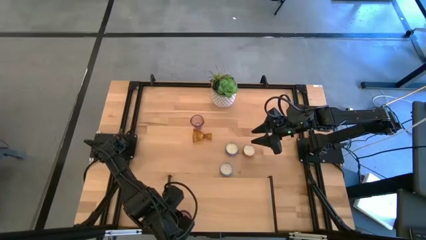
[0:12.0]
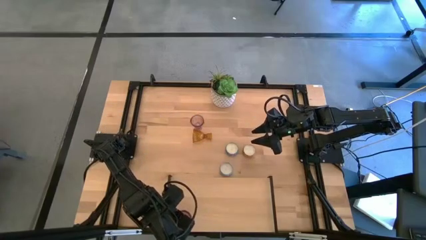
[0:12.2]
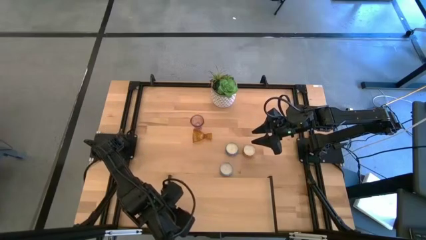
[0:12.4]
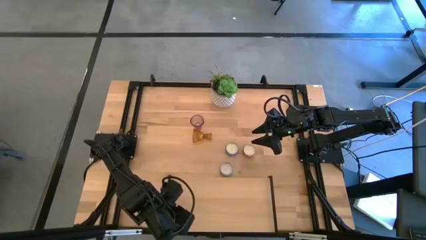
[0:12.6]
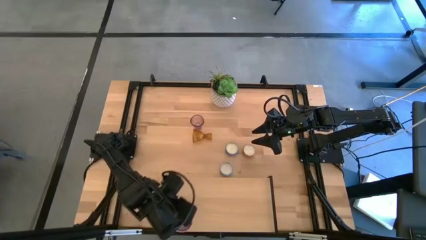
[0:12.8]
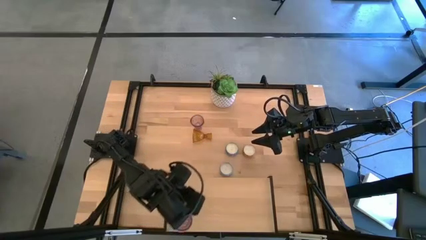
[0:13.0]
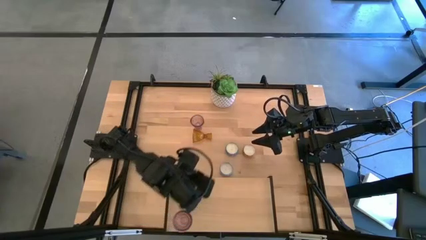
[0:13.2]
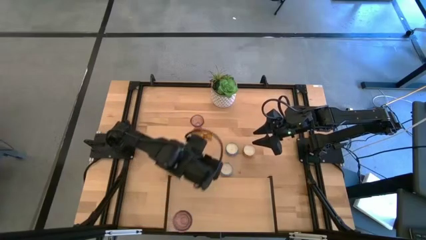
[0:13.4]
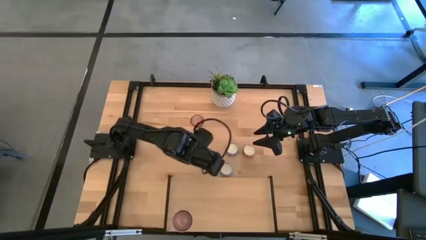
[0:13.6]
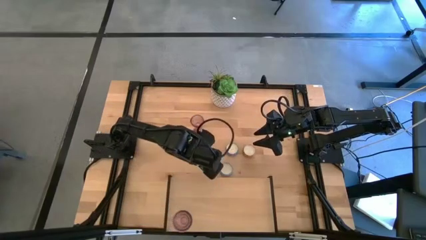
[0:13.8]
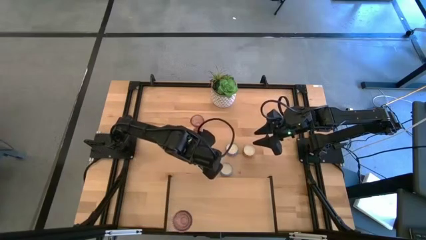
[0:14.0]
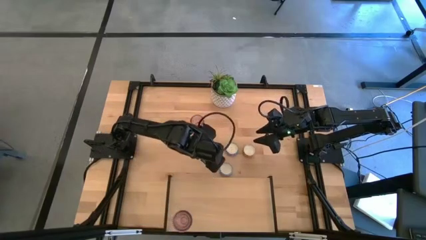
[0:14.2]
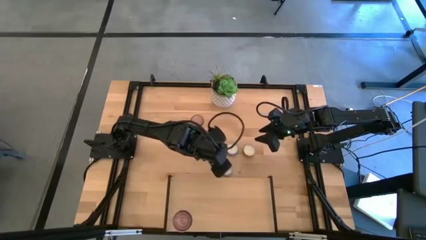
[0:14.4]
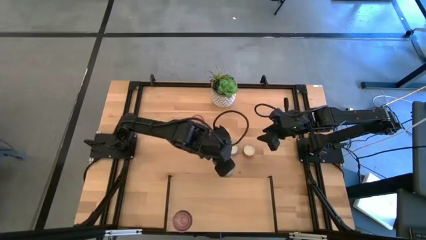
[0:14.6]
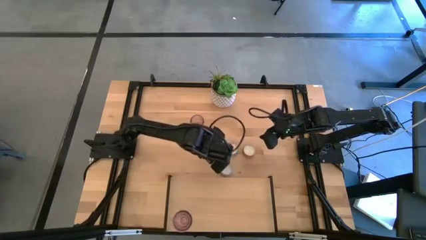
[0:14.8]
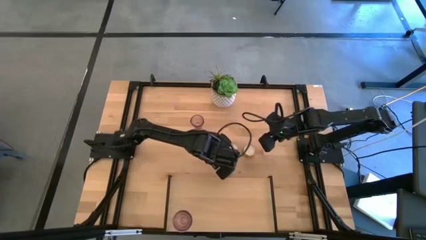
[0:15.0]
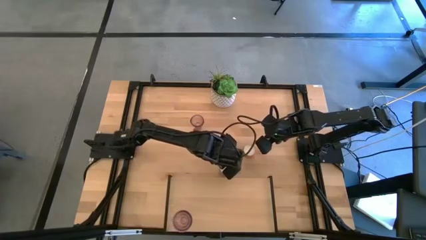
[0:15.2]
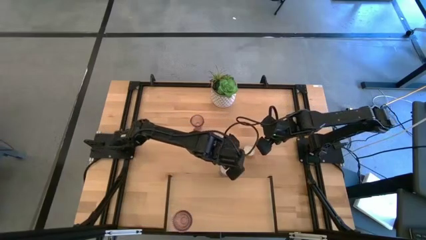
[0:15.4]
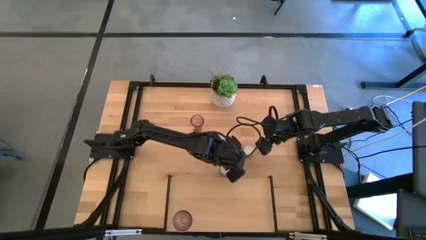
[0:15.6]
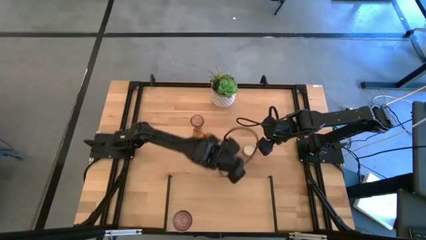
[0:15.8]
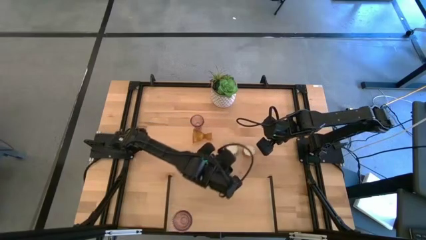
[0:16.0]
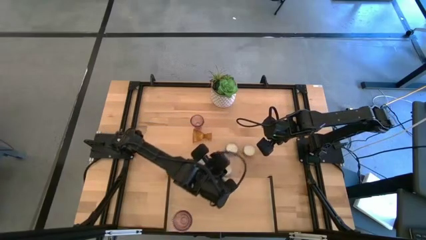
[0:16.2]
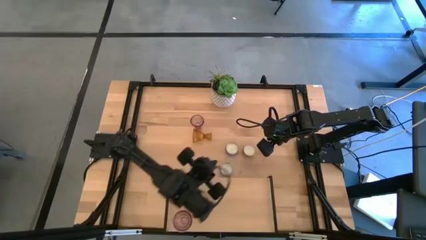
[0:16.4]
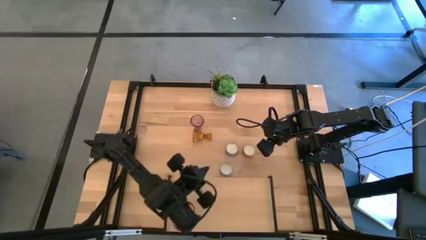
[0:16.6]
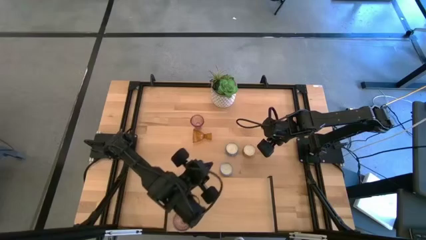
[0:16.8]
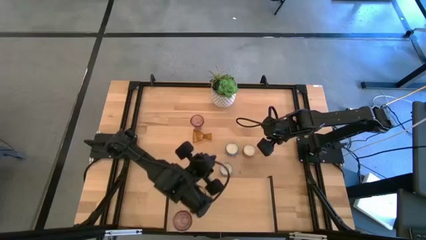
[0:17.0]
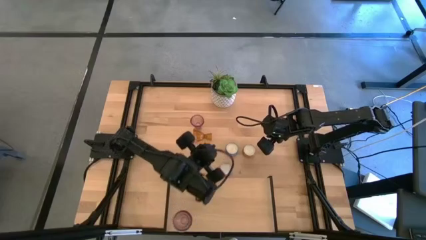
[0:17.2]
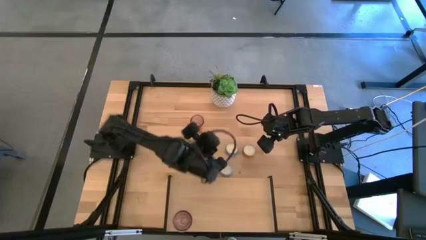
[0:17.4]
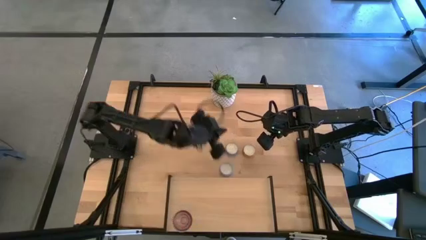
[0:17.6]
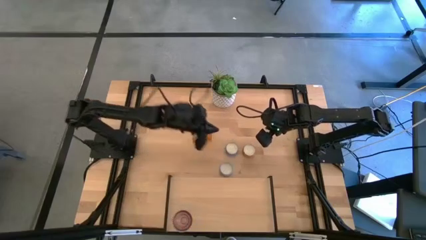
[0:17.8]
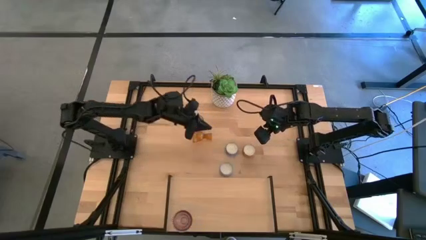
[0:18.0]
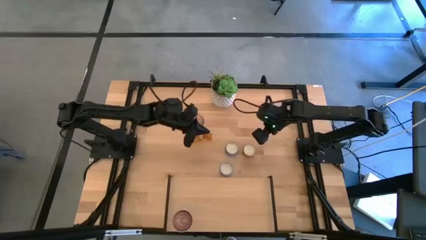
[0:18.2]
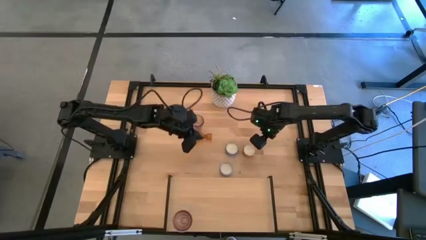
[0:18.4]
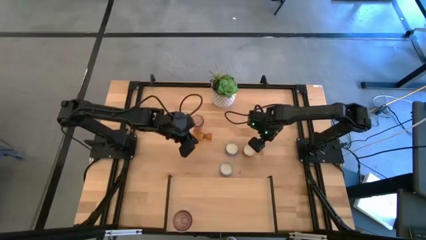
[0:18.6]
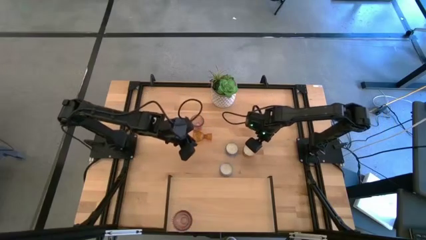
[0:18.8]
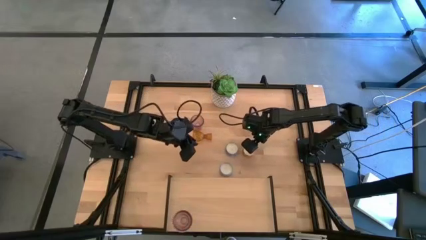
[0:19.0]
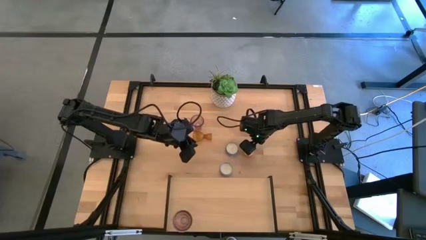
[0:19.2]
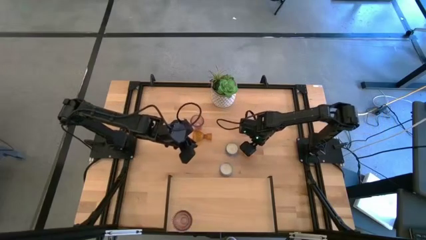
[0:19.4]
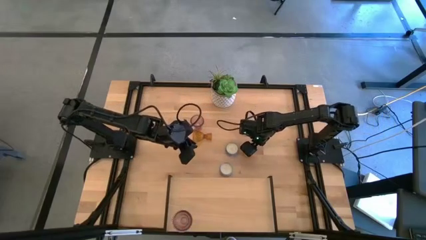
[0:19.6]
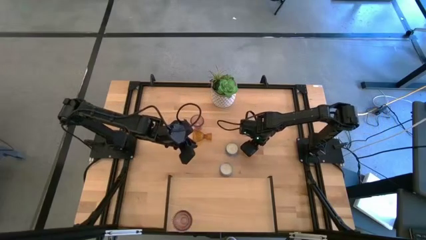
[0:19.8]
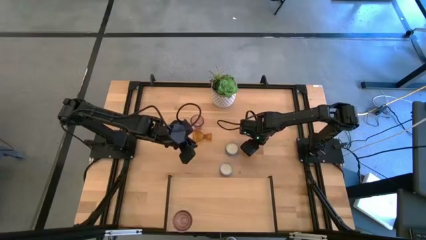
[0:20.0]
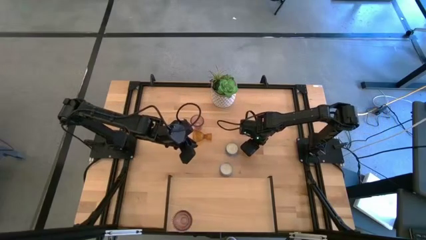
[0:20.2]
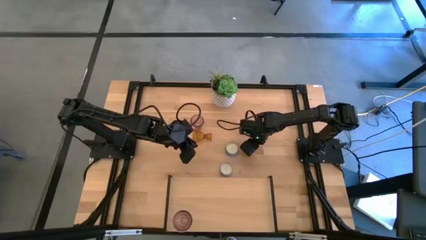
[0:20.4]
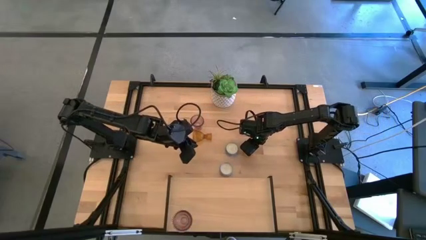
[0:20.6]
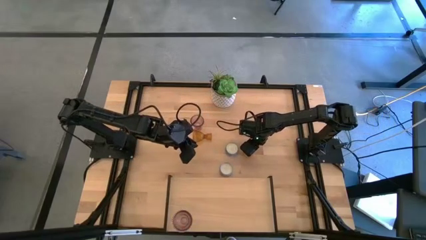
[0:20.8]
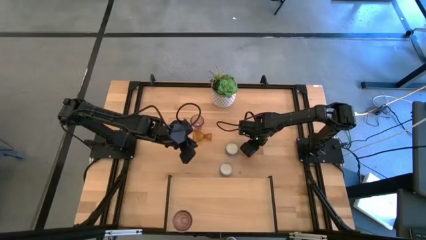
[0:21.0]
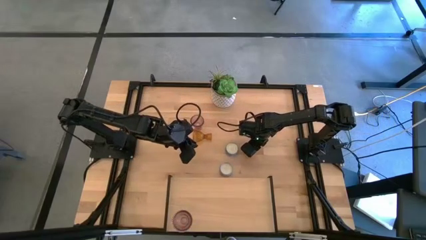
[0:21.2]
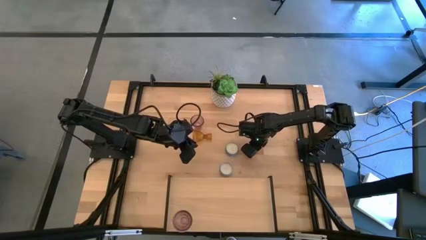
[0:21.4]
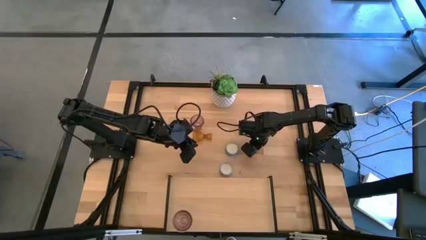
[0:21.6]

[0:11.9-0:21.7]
Task: Pick & Place candle stick holders
Put the orange scented candle on the shelf

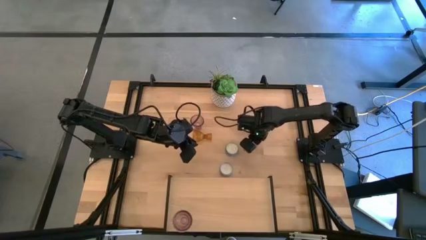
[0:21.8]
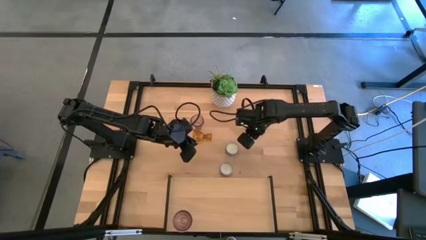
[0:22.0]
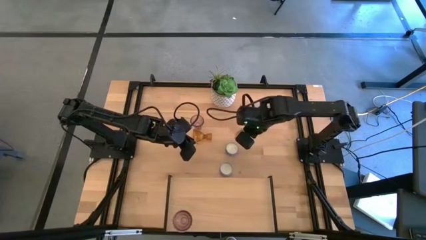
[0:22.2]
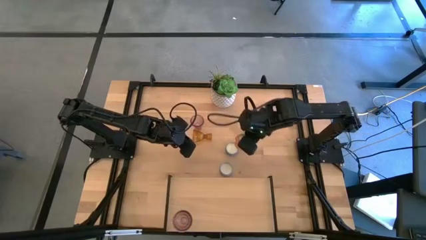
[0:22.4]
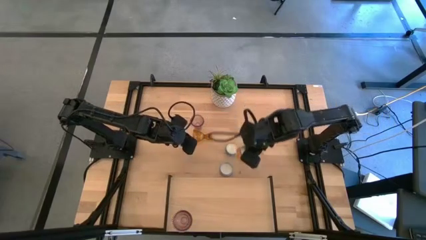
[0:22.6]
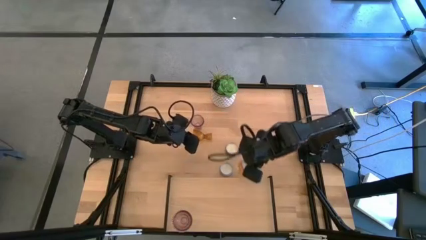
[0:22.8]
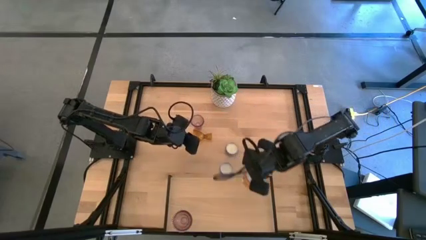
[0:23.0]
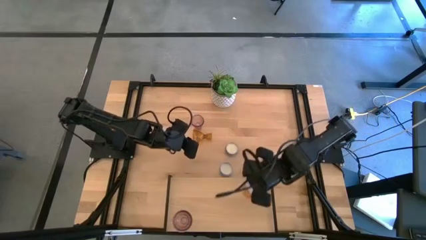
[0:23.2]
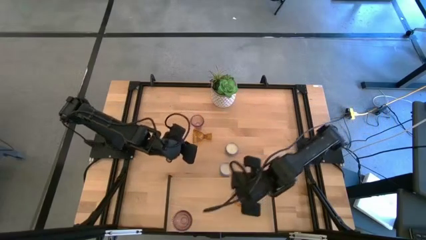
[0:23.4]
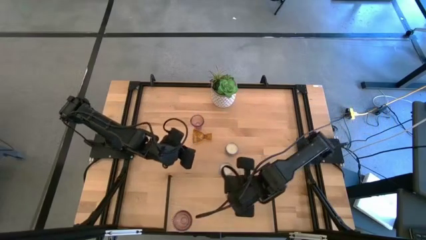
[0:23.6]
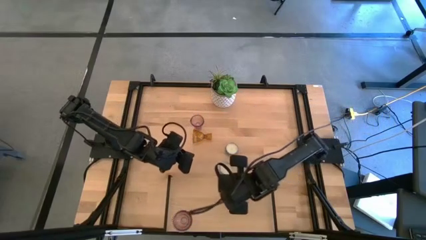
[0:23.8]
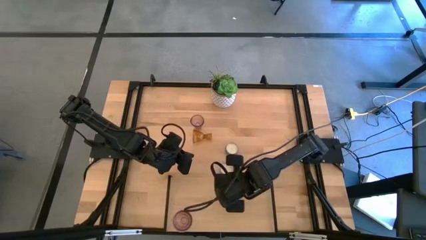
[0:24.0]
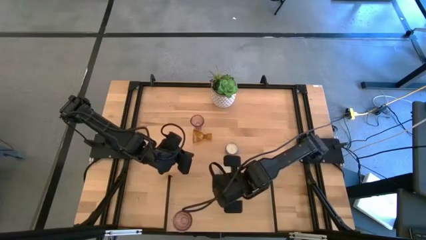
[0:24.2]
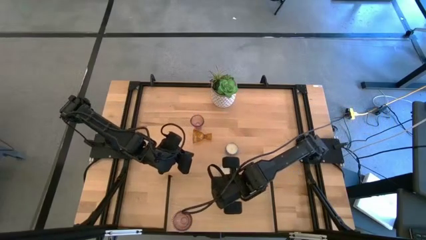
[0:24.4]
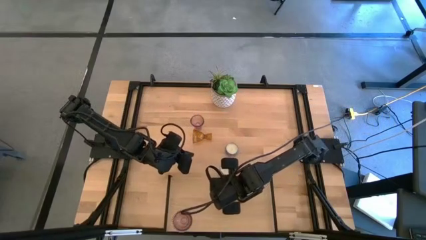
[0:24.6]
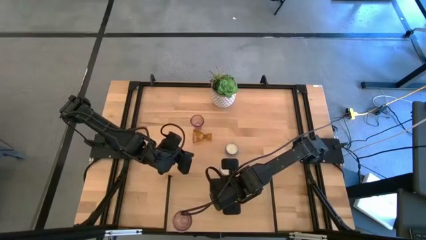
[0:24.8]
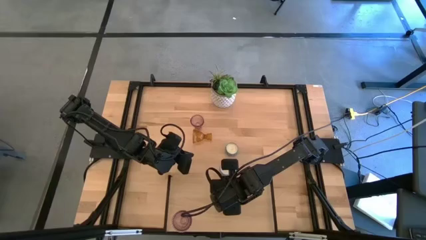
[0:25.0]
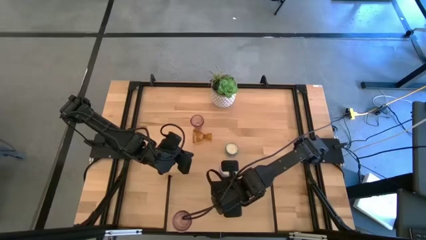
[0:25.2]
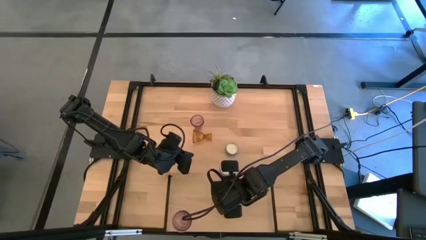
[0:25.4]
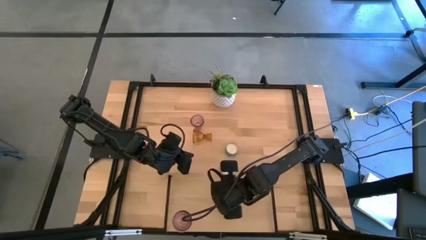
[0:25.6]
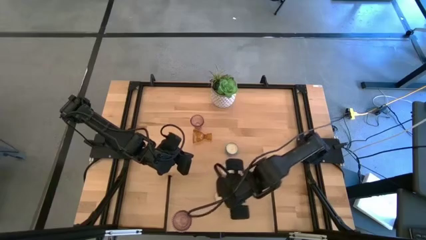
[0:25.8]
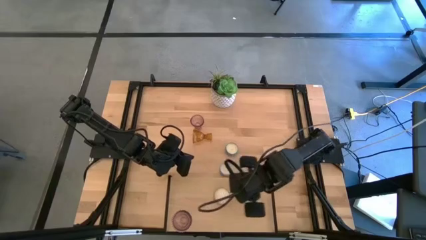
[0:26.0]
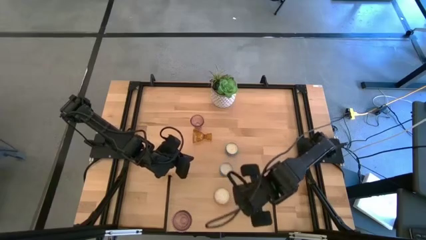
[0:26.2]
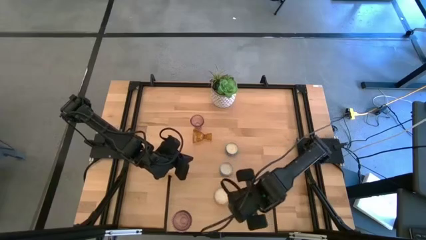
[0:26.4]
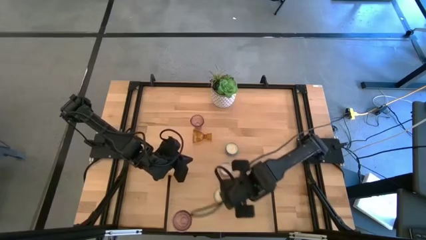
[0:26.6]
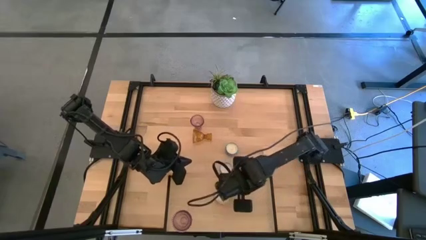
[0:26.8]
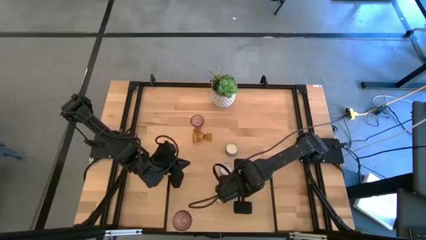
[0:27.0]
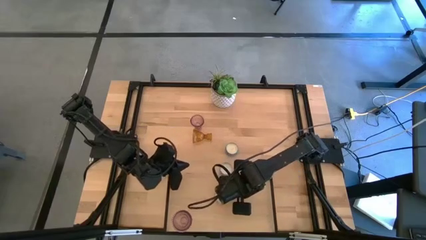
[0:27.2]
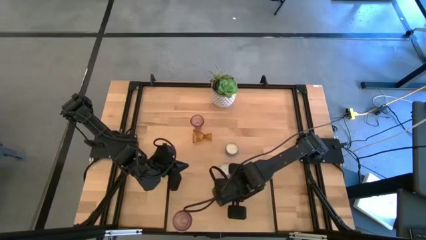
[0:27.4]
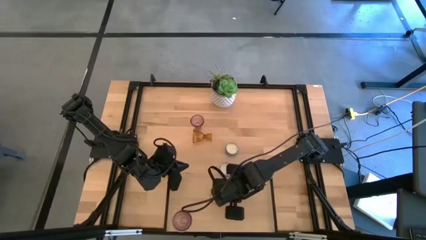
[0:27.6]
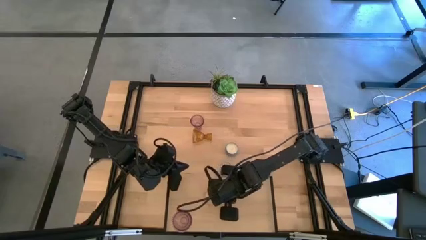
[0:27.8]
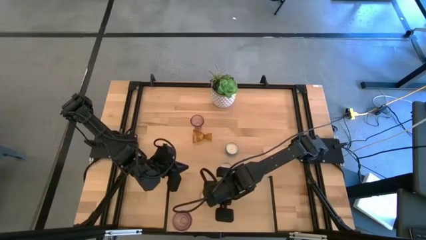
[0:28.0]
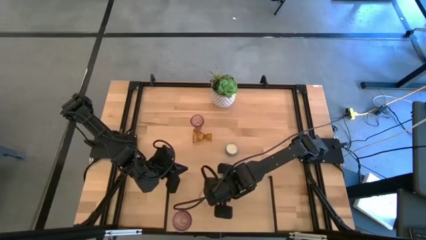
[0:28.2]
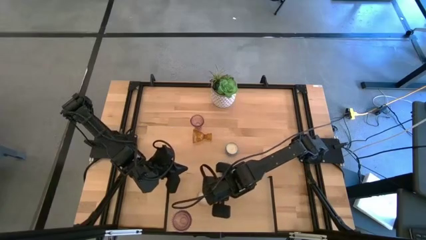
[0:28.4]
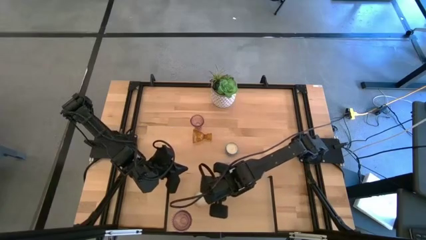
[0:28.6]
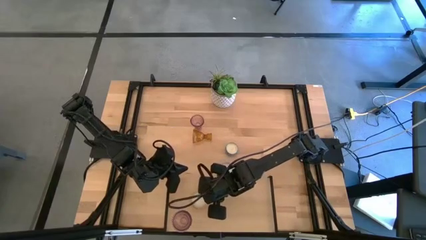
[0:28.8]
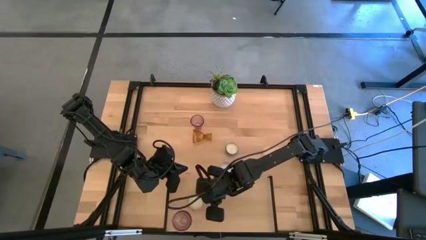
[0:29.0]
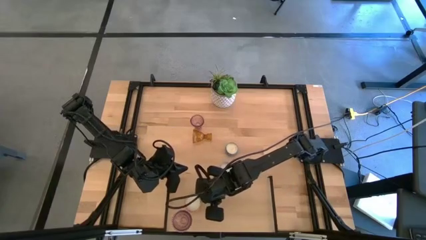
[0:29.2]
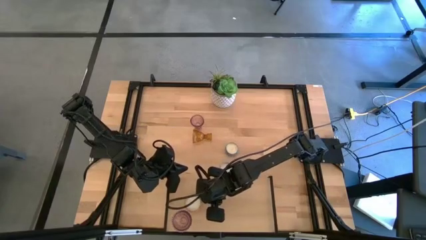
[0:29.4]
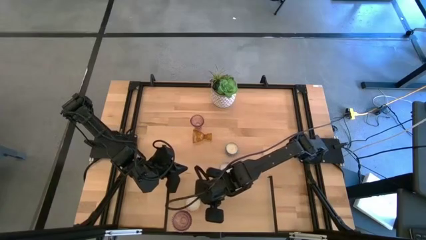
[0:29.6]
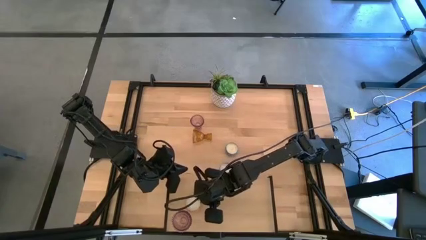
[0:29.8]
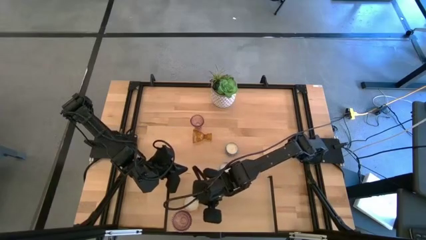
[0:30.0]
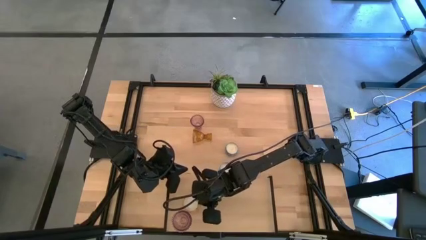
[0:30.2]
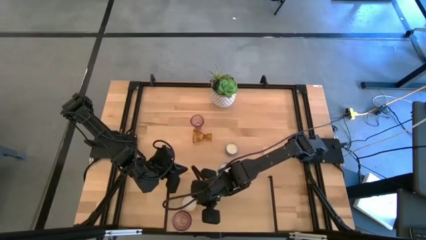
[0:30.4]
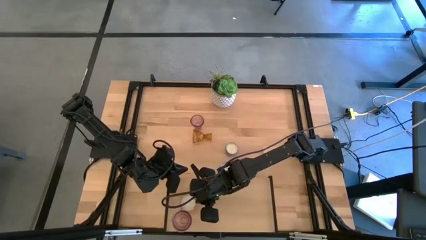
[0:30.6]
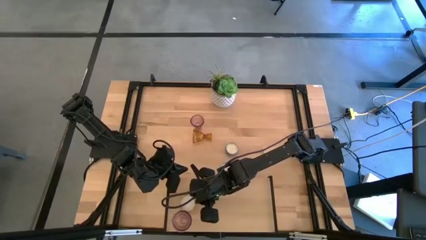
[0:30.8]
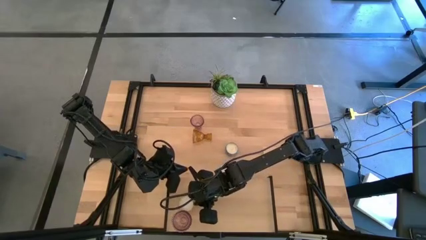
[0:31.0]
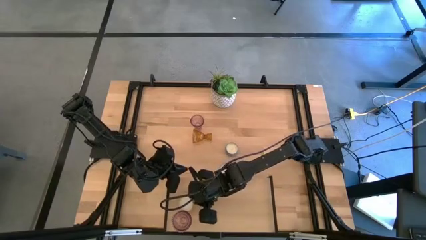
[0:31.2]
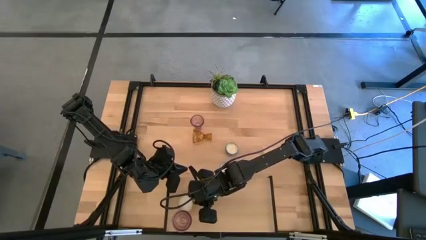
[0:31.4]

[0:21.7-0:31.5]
Put the orange scented candle on the shelf
